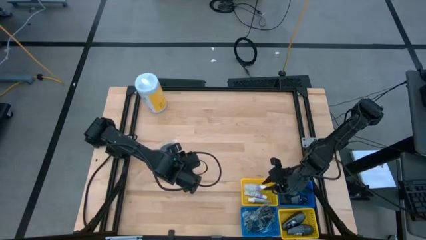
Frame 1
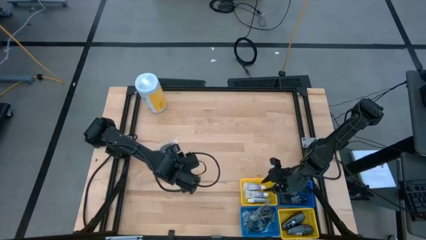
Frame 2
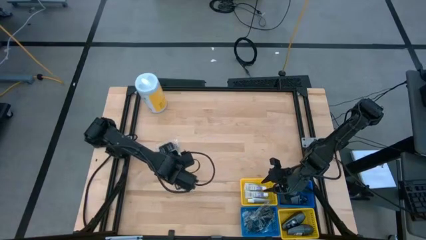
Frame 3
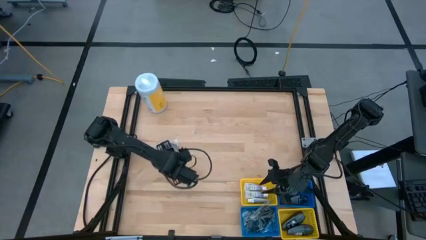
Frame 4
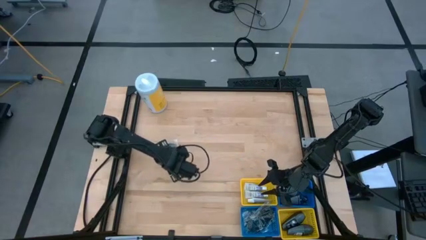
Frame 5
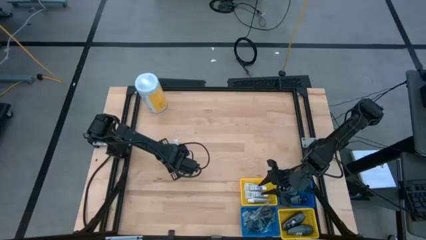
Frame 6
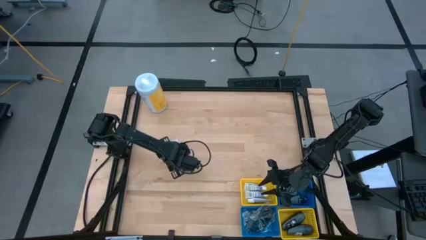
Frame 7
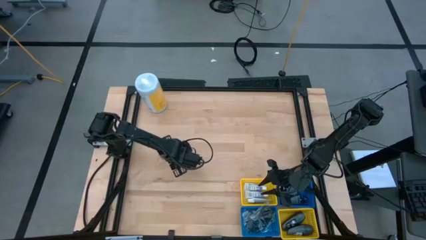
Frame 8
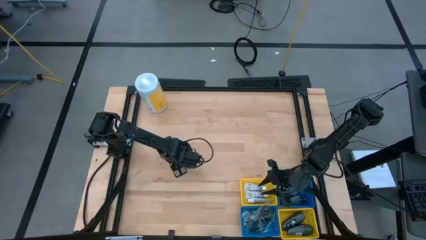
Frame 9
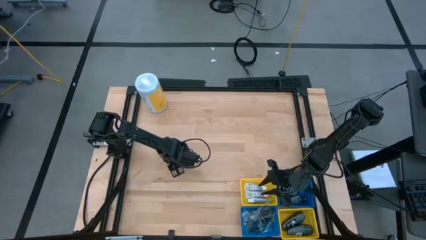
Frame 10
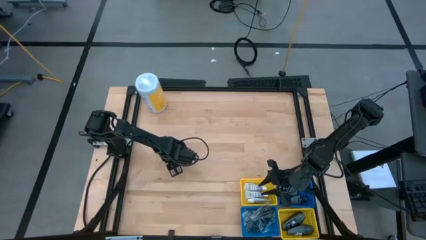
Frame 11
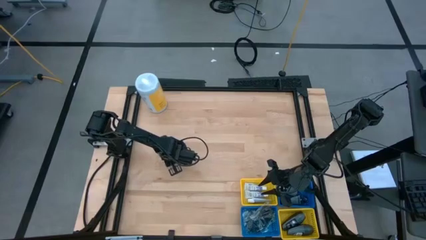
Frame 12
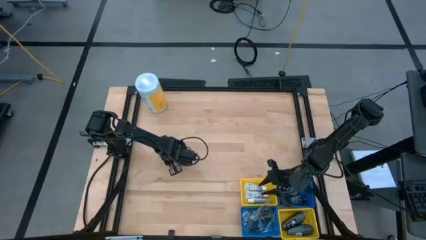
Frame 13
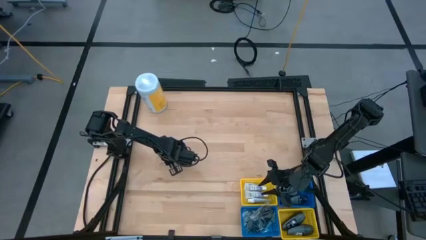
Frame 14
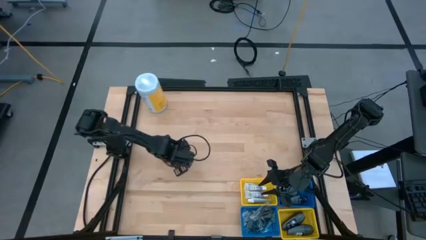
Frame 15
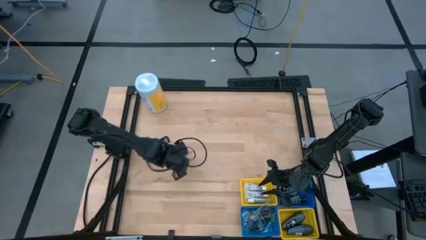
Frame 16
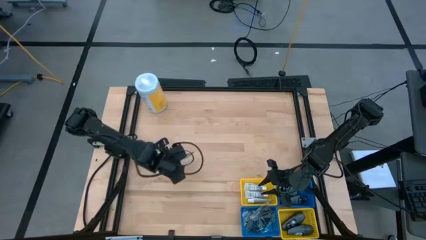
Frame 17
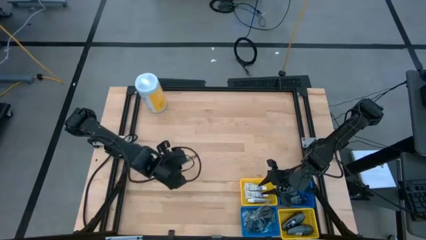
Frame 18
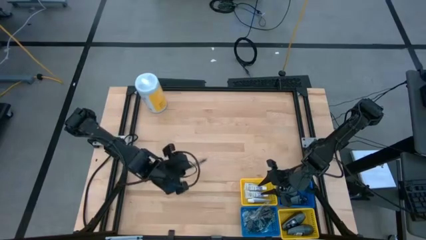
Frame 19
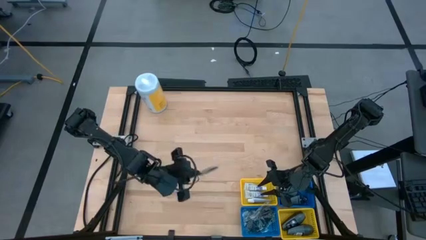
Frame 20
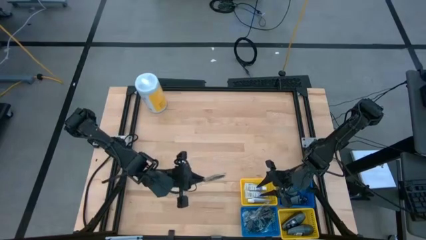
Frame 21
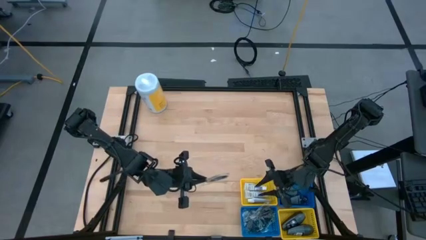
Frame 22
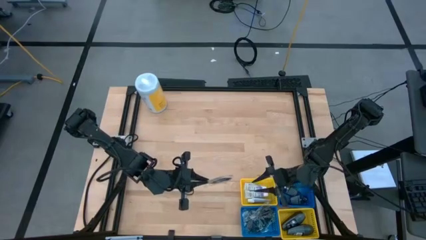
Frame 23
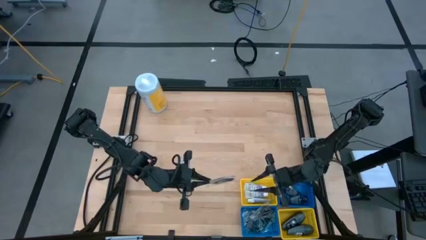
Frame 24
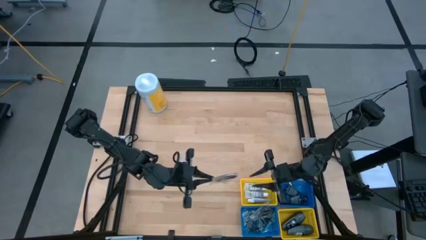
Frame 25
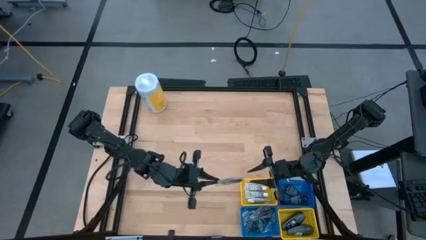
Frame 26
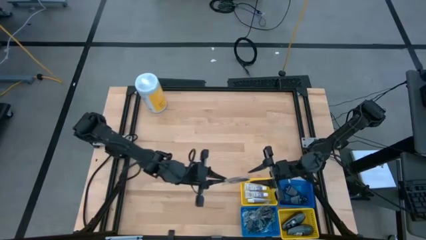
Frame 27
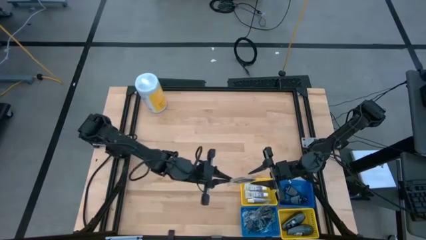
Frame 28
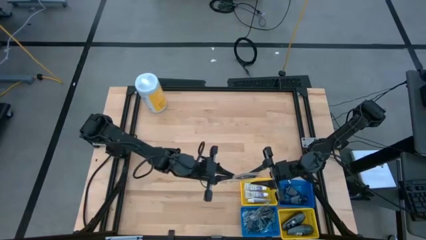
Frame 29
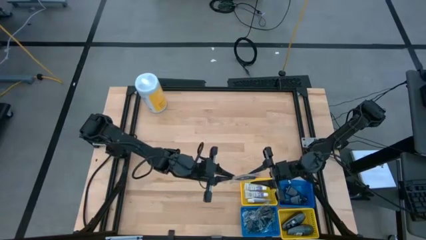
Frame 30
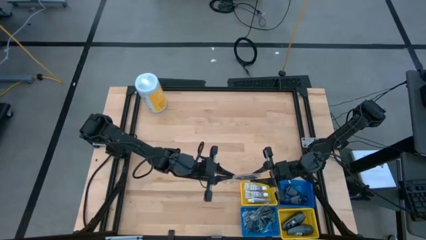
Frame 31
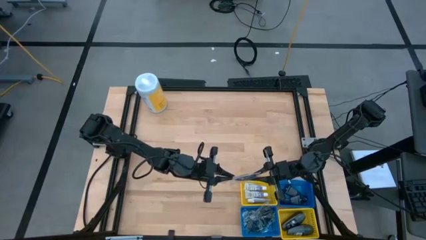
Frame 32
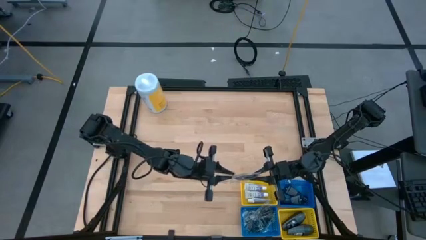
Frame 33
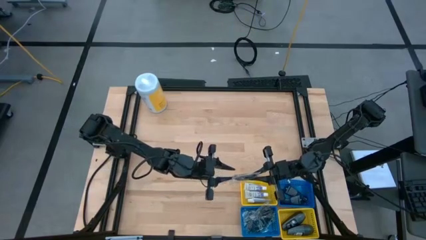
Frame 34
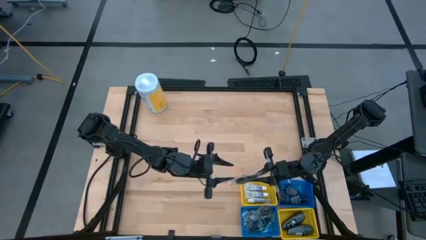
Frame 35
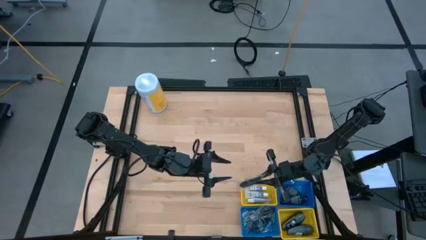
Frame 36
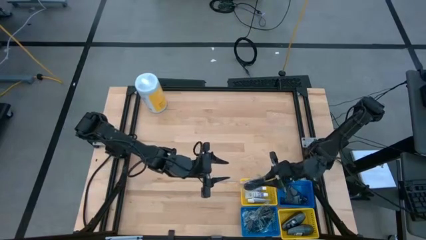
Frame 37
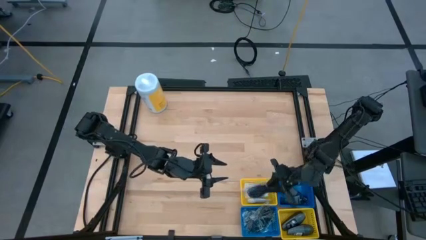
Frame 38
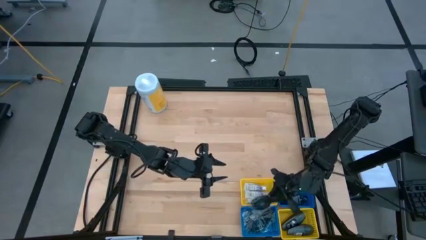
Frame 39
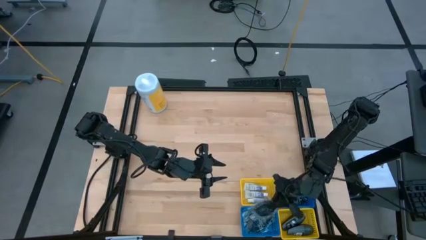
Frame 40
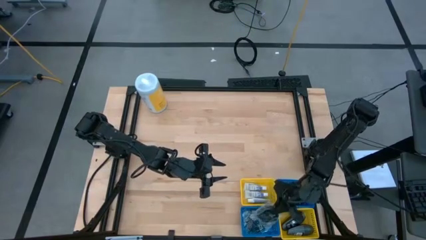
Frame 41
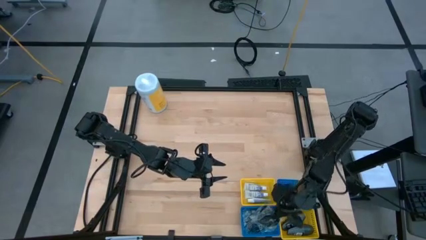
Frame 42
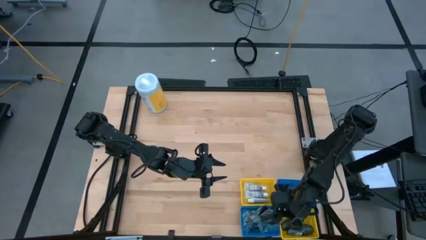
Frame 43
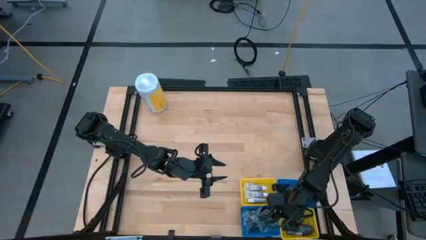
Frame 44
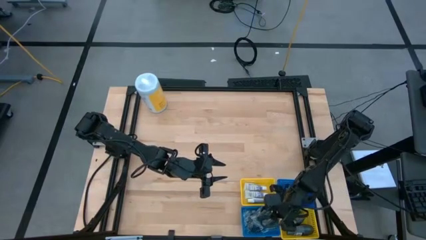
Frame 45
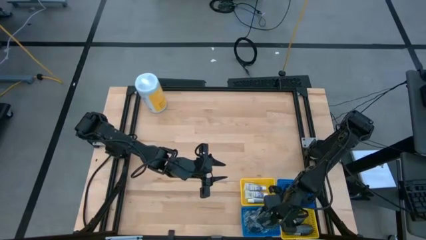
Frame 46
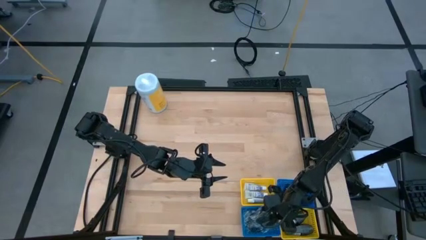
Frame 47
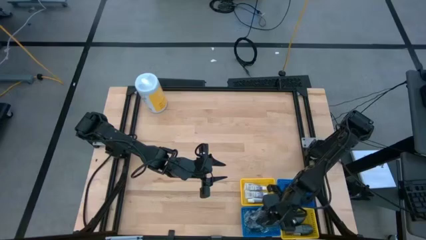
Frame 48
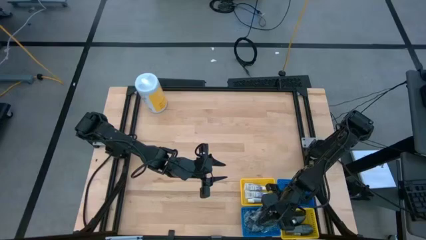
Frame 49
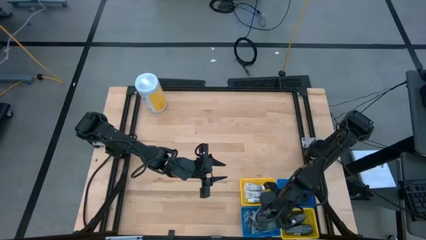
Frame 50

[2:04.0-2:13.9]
Task: Pick & Place Travel size toiletries
Put the black hairbrush into the bottom blue bin

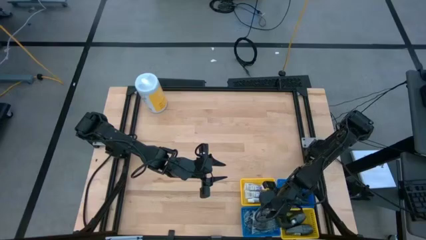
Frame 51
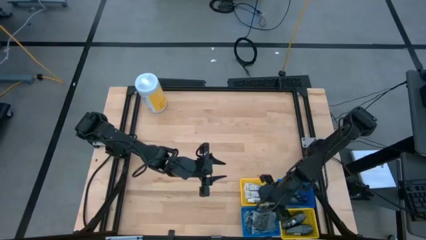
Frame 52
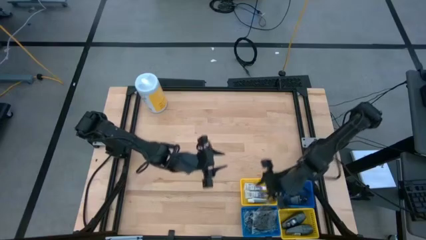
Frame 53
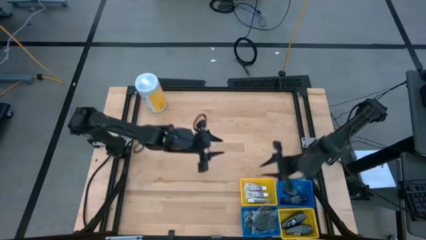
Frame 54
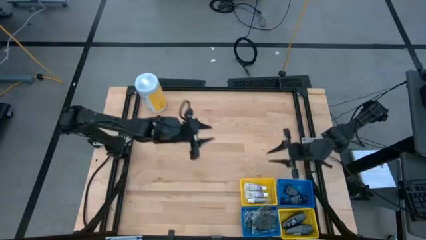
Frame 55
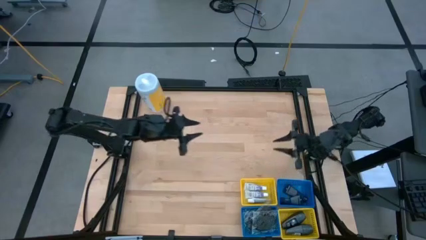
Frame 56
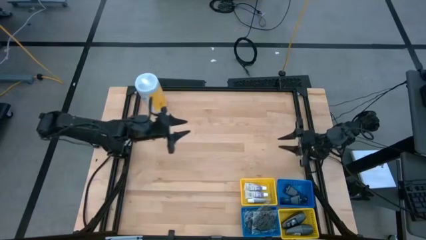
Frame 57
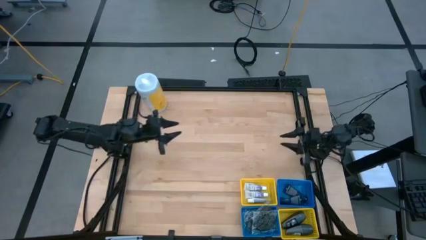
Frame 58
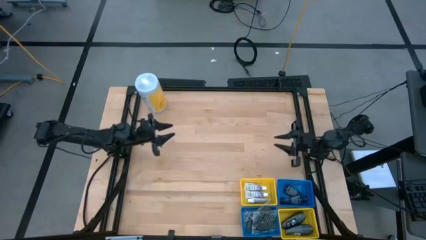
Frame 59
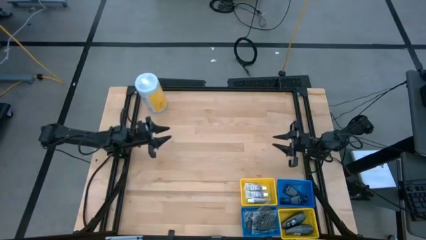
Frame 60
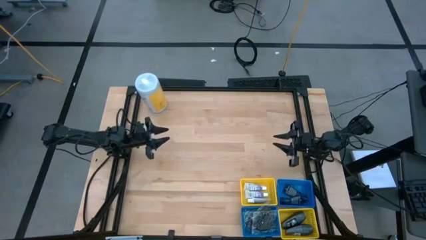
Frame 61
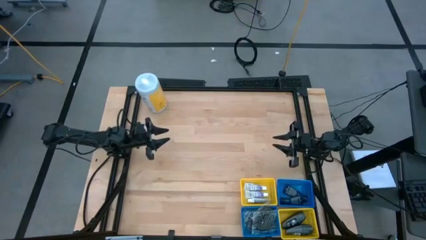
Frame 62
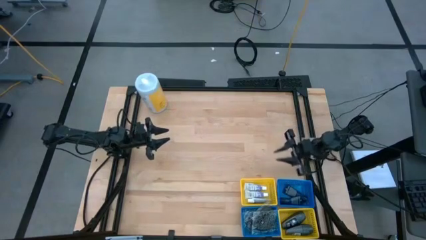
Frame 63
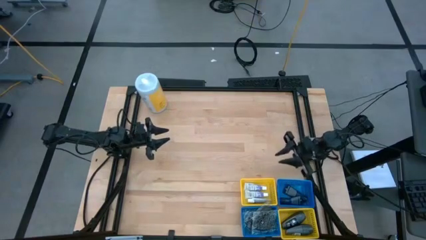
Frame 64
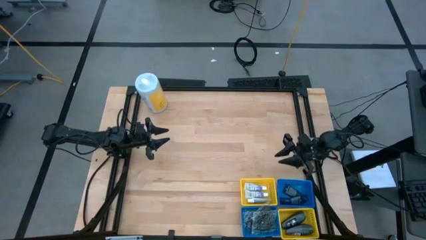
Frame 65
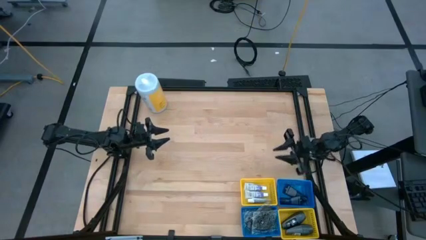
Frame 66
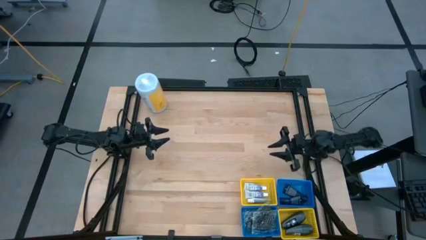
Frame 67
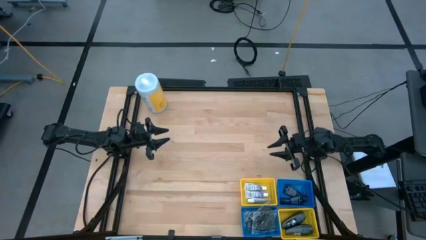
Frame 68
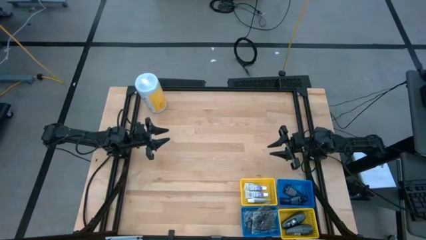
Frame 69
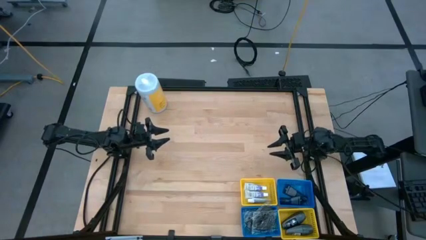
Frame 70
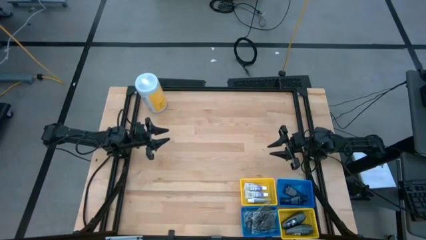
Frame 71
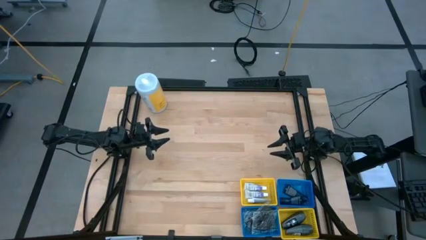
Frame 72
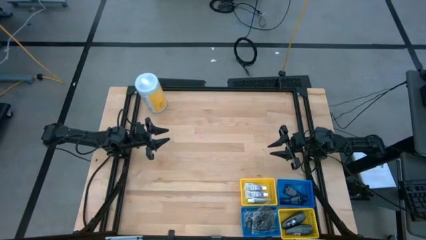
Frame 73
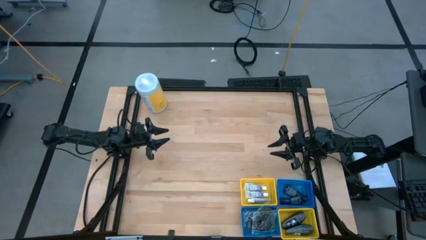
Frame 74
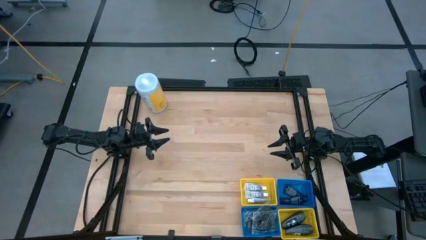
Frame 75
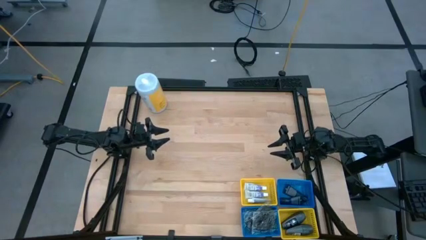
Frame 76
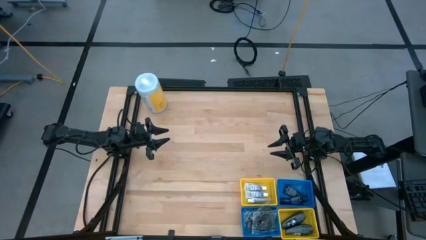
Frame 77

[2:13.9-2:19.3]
Return to Home Position

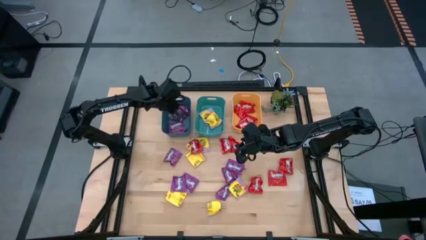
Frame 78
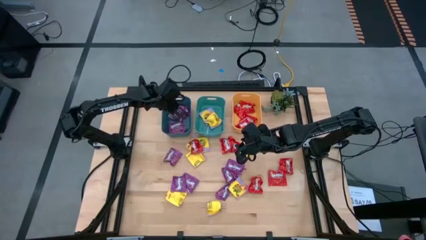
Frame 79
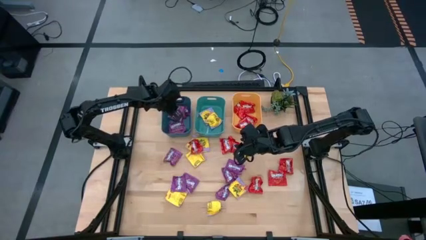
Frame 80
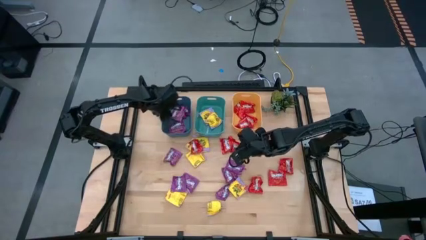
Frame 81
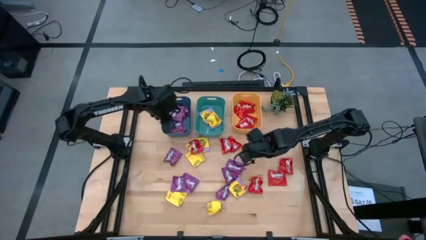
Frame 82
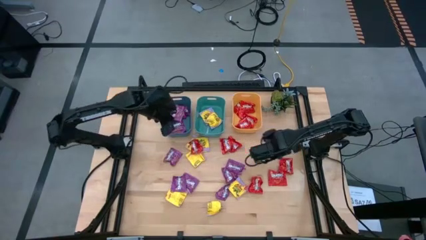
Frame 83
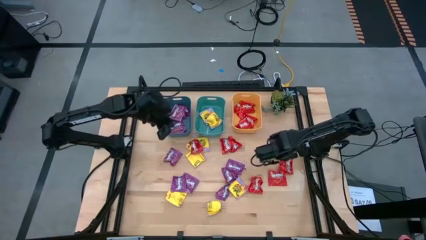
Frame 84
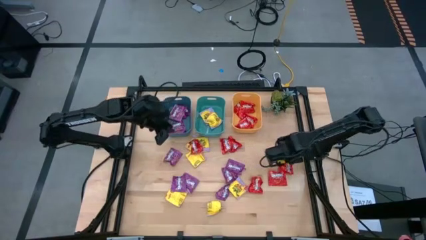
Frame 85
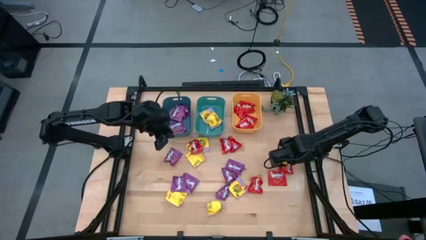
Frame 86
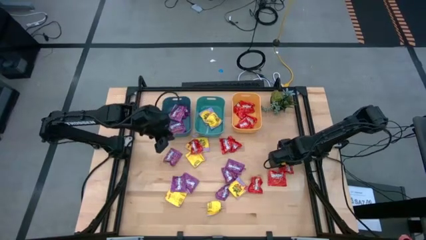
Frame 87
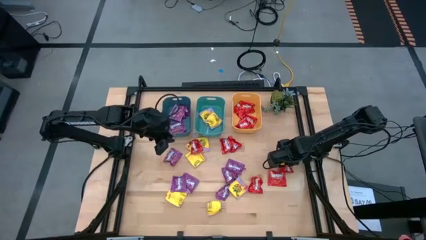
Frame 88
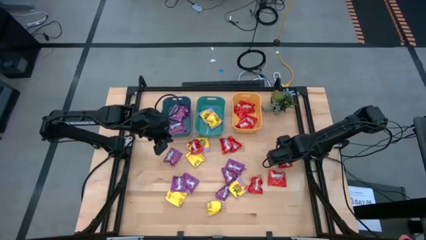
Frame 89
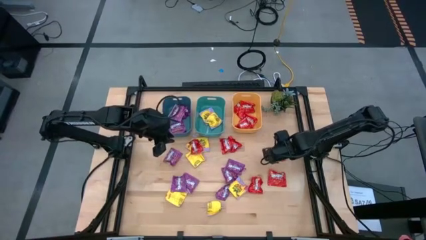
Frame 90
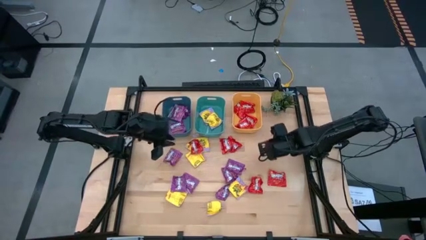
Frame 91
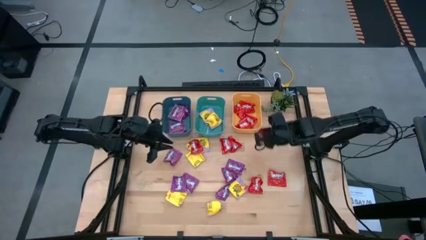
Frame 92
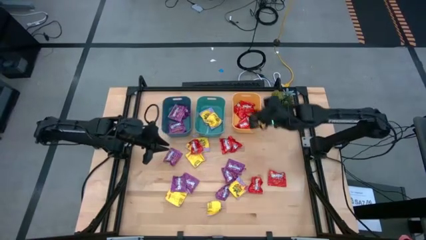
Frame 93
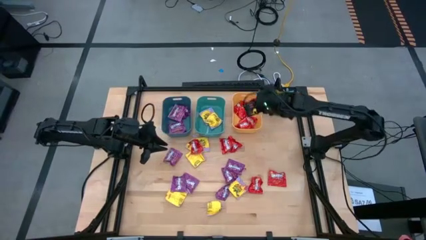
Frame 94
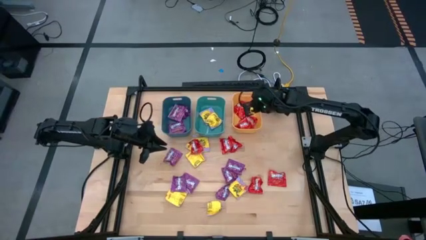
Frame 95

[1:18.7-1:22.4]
Task: Sort candy
Put the red candy into the yellow bin
